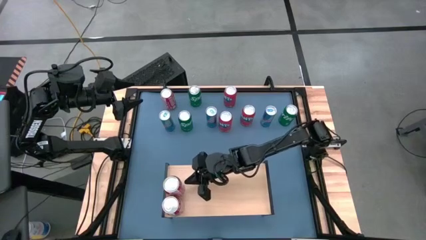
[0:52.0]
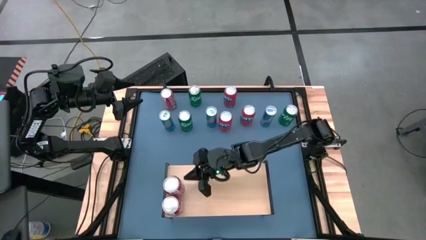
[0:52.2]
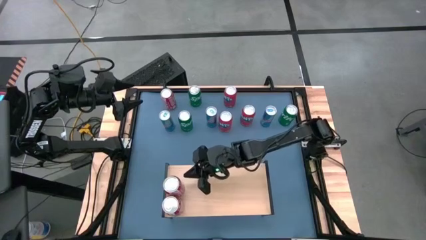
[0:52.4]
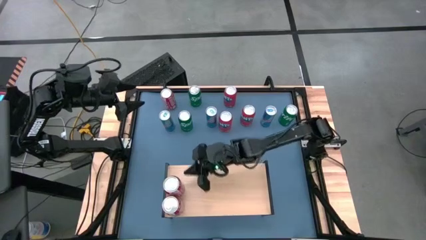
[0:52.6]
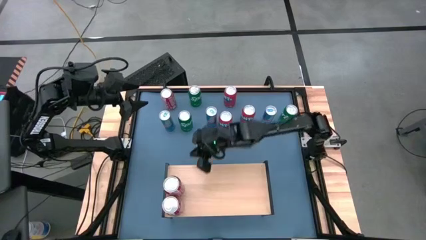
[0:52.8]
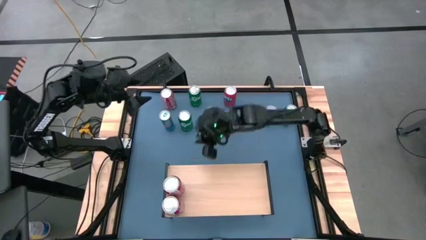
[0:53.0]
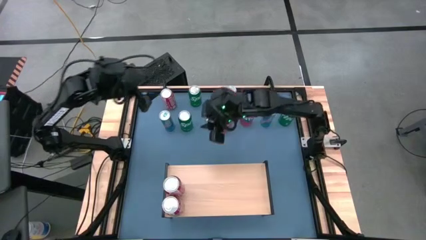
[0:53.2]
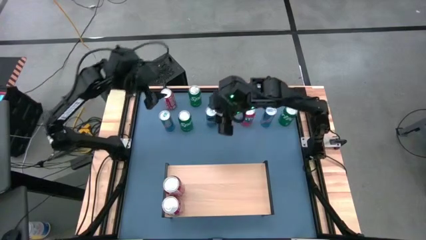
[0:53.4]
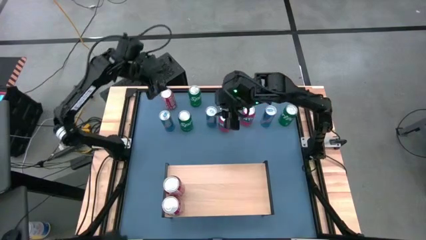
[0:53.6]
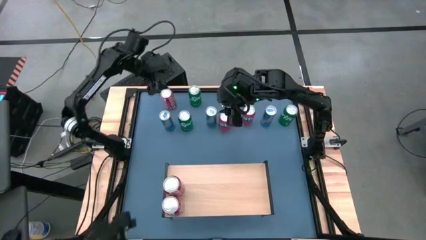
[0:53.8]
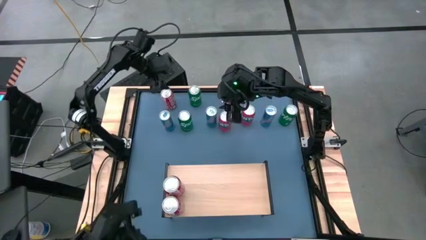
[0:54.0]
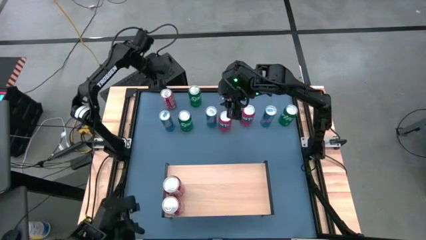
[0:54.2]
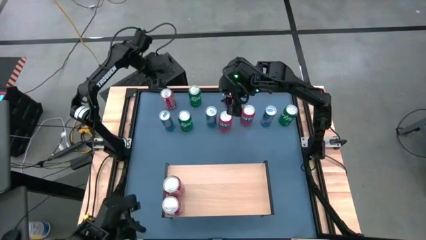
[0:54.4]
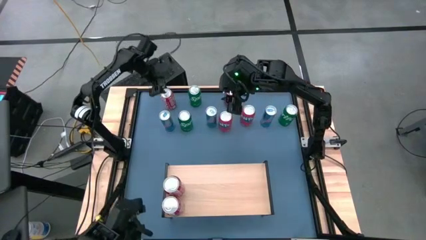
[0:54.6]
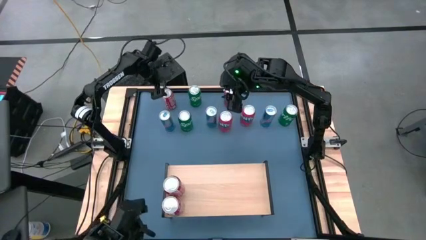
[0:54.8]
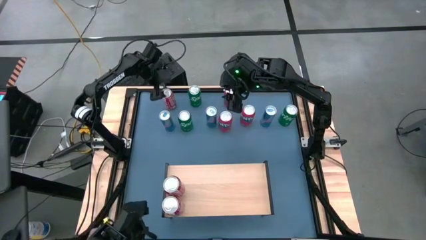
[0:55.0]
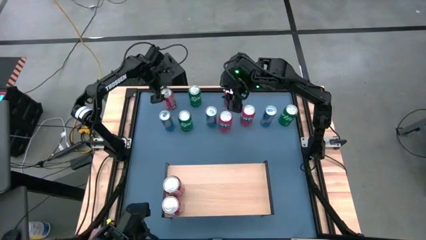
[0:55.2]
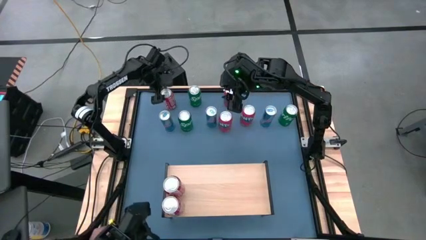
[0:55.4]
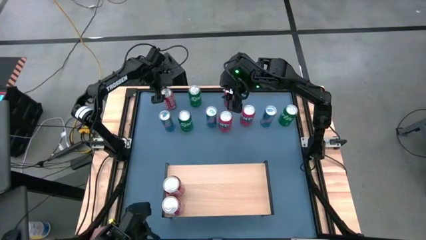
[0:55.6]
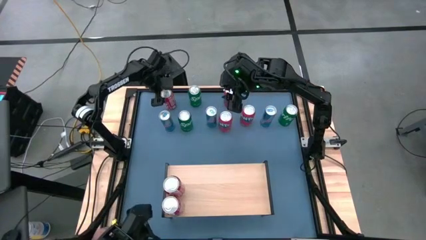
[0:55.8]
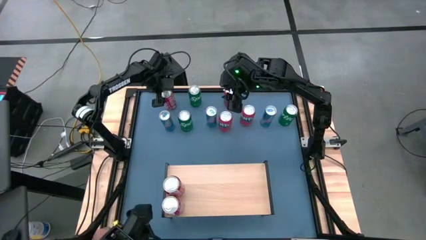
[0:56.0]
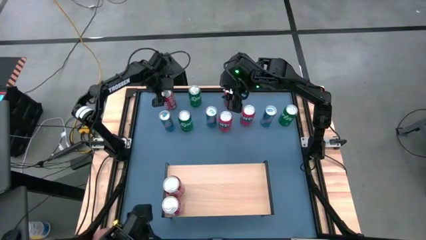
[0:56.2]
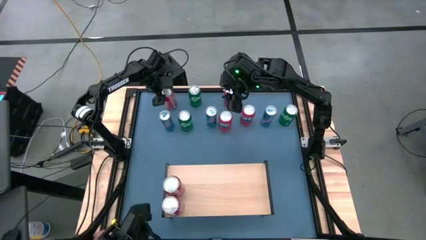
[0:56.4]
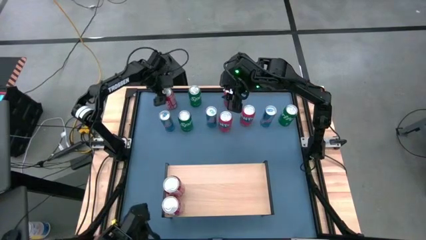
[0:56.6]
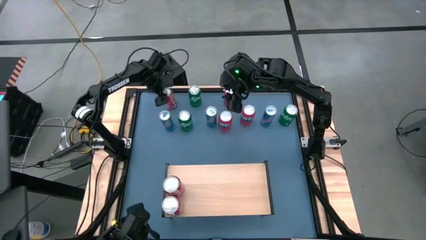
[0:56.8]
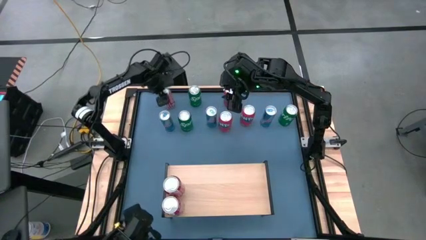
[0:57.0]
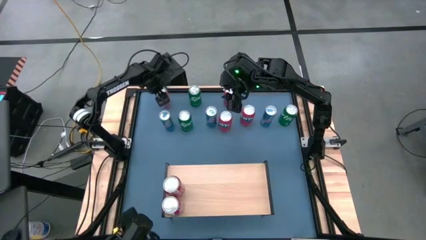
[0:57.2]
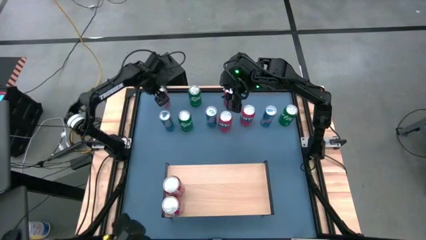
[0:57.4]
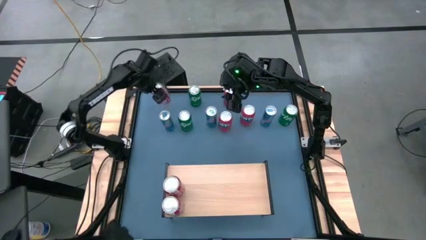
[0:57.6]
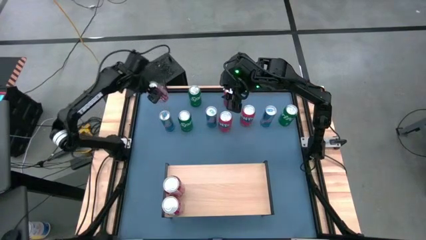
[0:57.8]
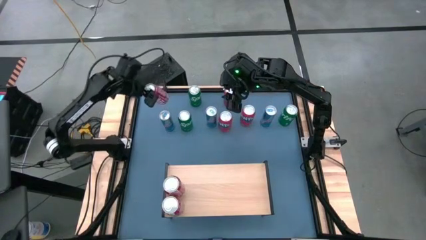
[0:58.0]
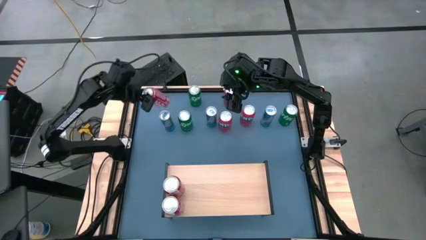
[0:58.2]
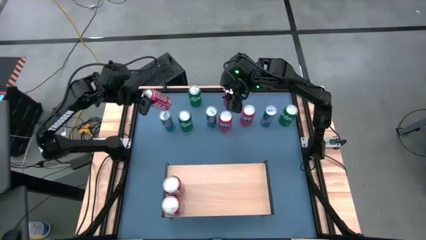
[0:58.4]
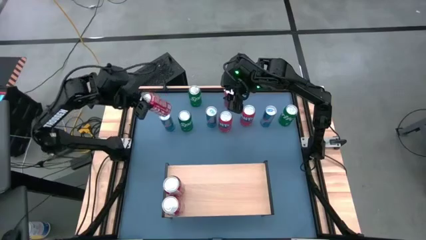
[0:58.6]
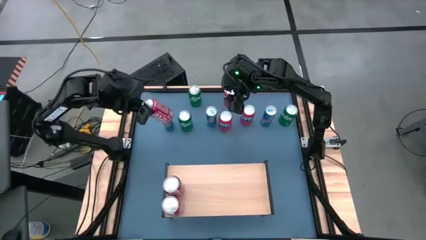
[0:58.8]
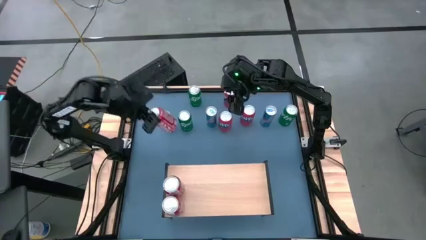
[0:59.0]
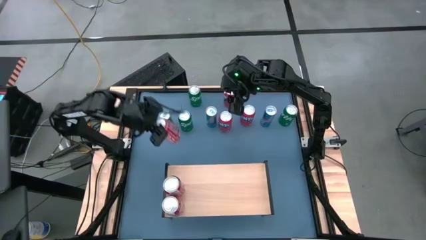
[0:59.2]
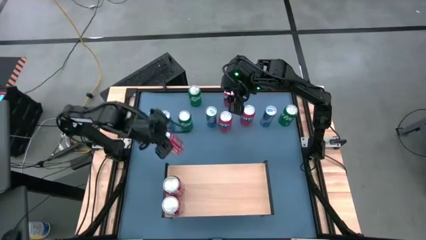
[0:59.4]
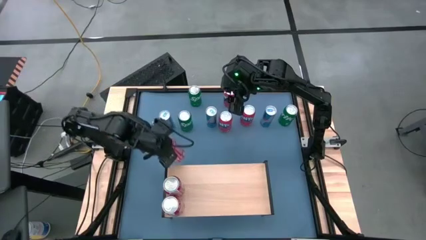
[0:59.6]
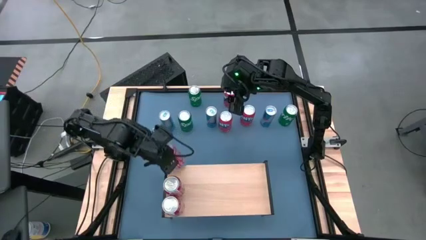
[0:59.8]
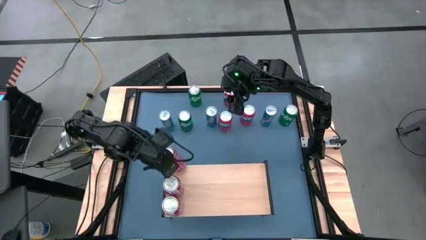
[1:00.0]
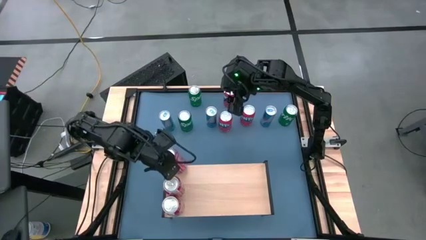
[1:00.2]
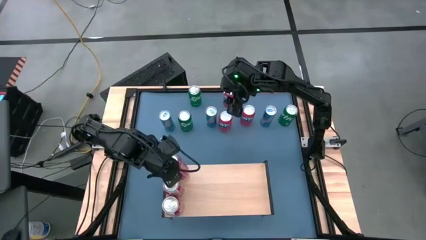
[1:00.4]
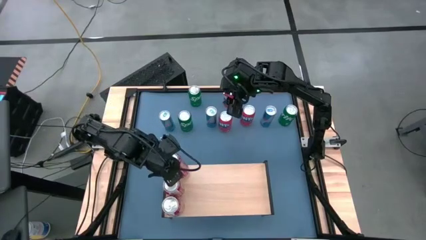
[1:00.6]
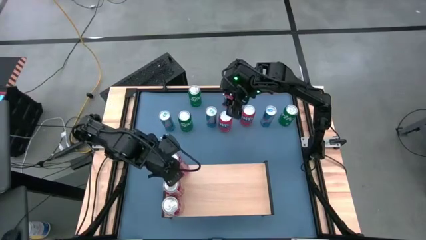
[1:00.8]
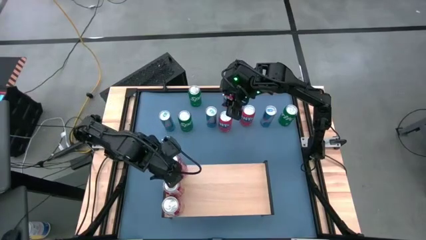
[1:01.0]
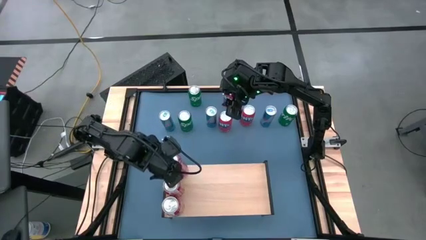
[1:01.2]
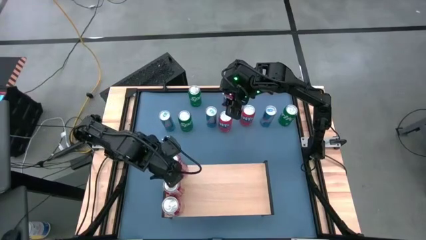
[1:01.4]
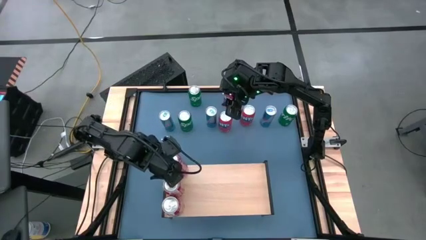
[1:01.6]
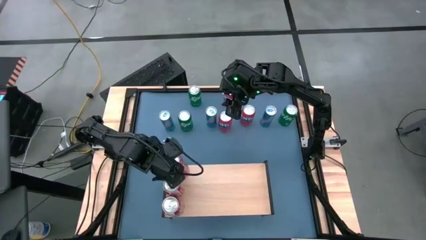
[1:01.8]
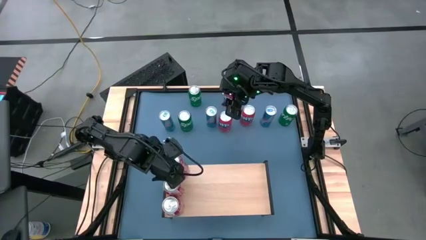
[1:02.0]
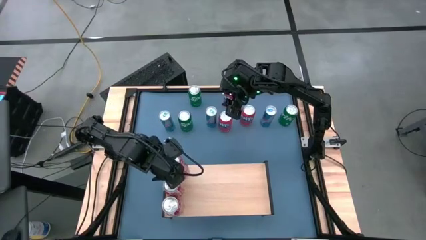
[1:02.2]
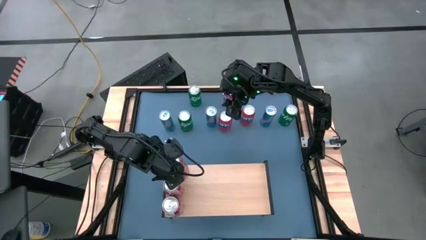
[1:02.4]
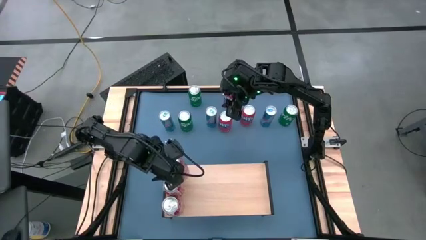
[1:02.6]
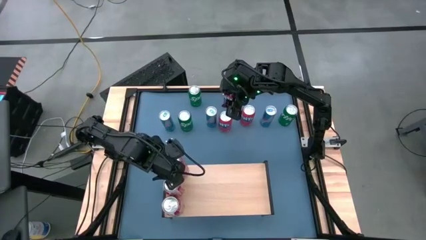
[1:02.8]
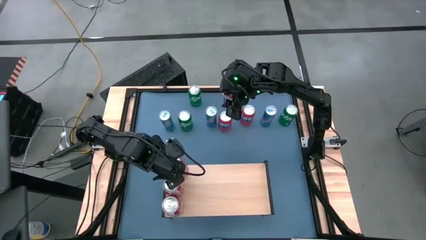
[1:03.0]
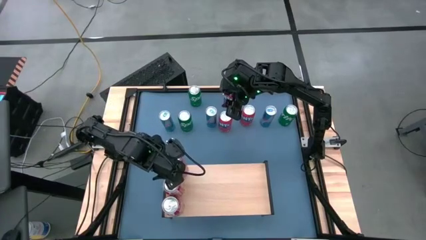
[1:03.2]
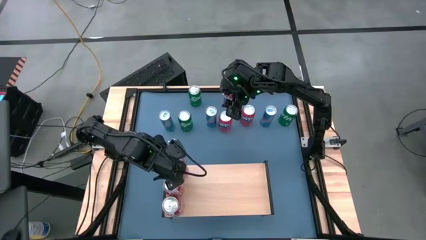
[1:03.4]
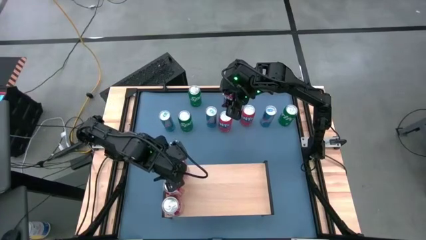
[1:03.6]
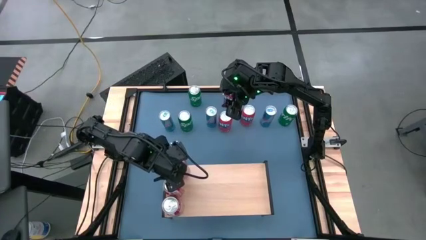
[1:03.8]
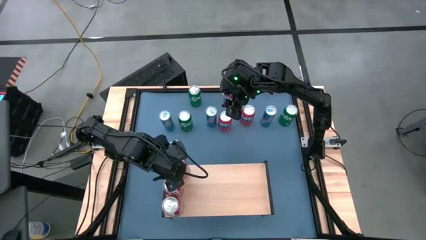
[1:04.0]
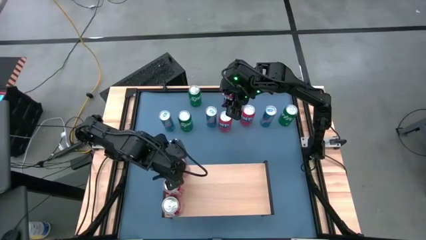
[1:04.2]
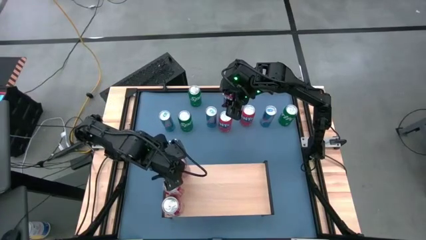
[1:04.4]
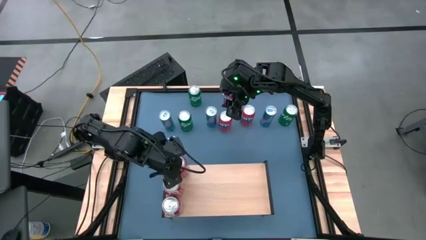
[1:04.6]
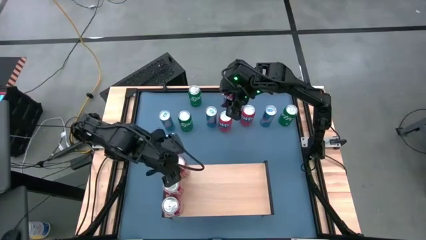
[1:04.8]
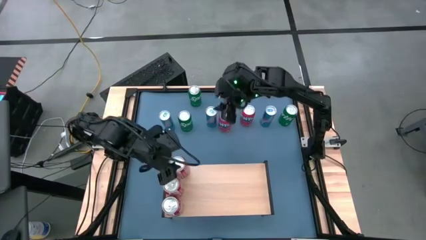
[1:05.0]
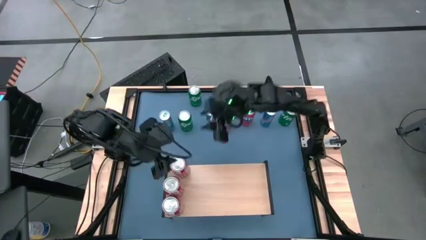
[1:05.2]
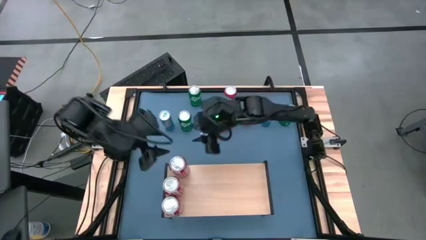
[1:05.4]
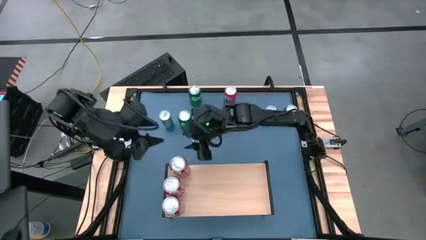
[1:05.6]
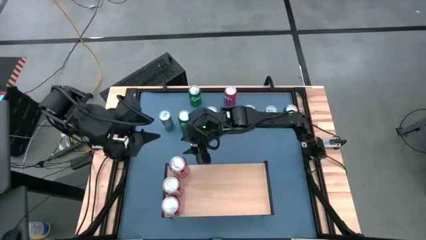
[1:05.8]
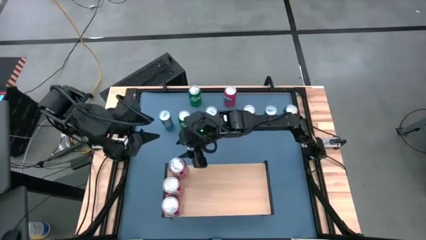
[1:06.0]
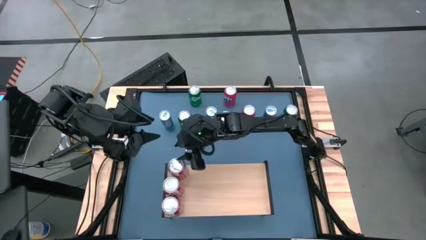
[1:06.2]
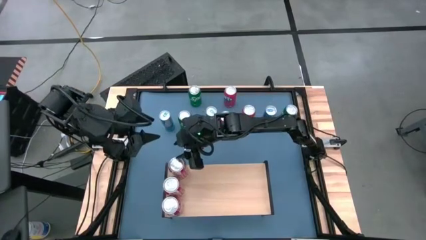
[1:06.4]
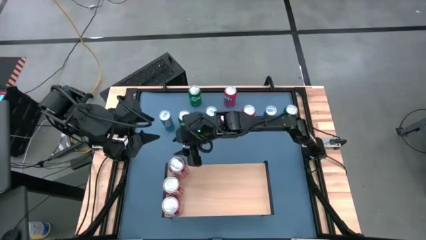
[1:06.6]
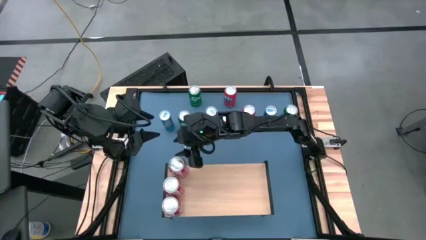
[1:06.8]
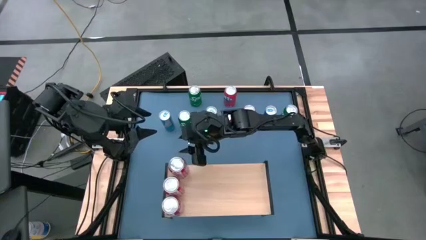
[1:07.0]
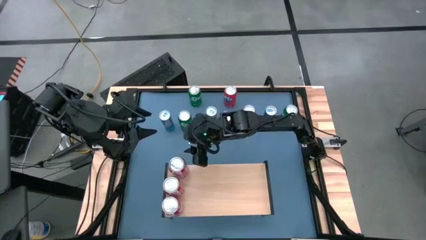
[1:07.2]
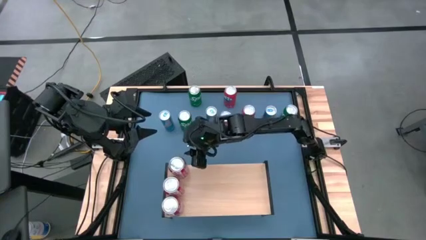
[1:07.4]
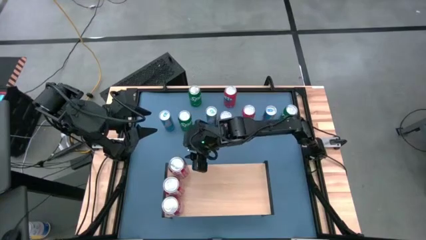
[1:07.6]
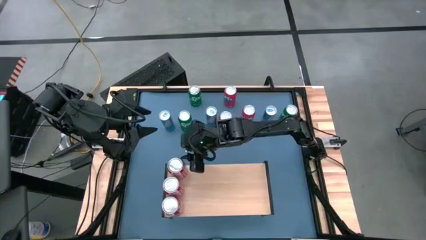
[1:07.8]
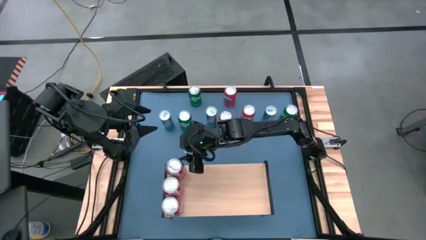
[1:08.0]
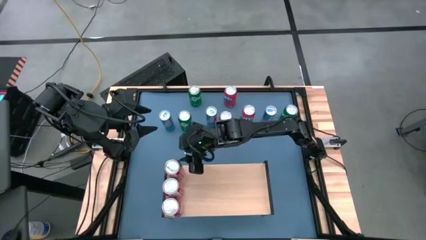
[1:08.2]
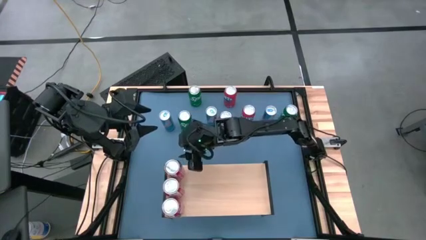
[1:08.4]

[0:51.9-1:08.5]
Task: Place canned beverage on shelf
Put the red soda can on the shelf aligned with the other red soda cans
